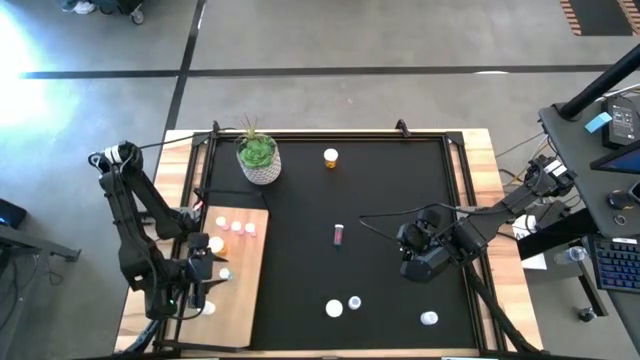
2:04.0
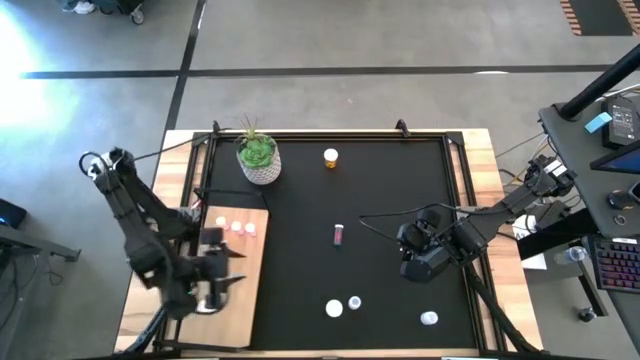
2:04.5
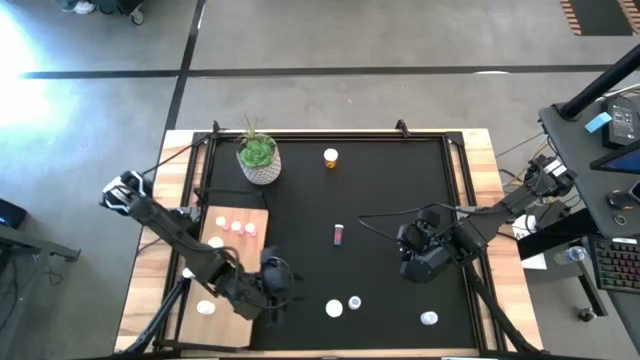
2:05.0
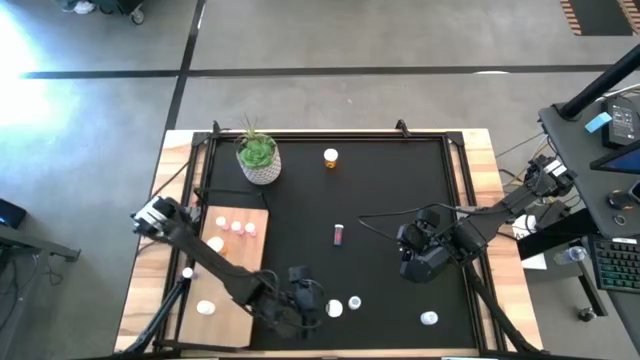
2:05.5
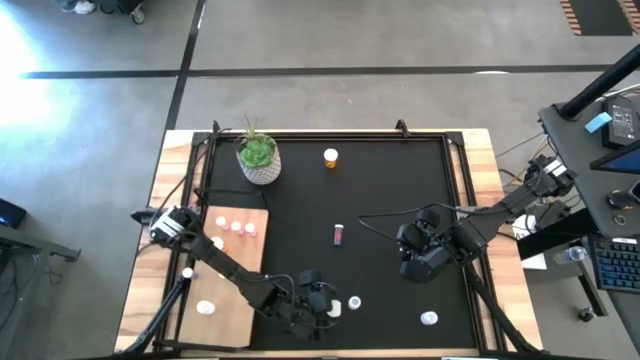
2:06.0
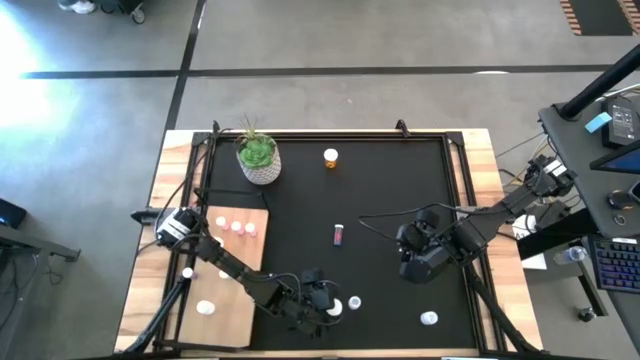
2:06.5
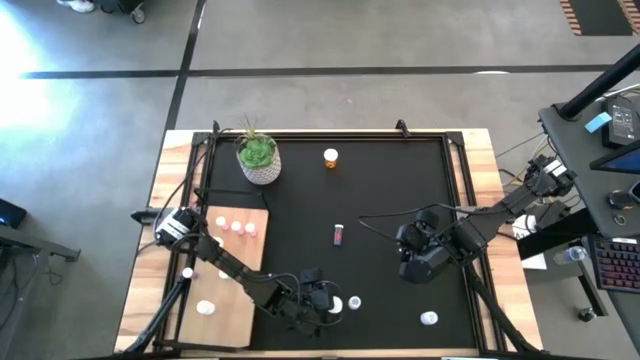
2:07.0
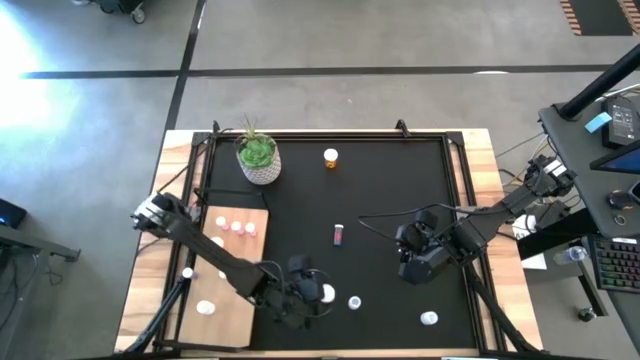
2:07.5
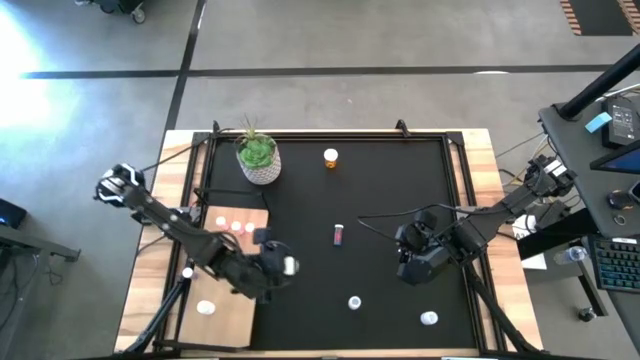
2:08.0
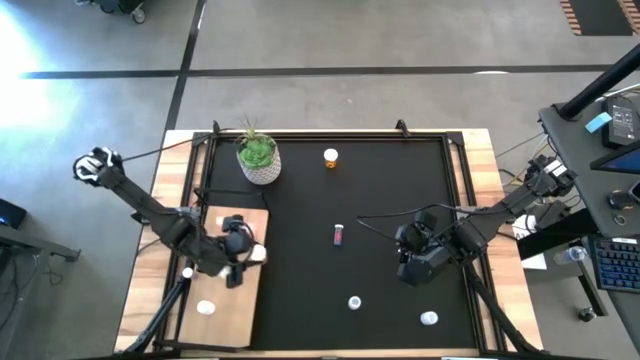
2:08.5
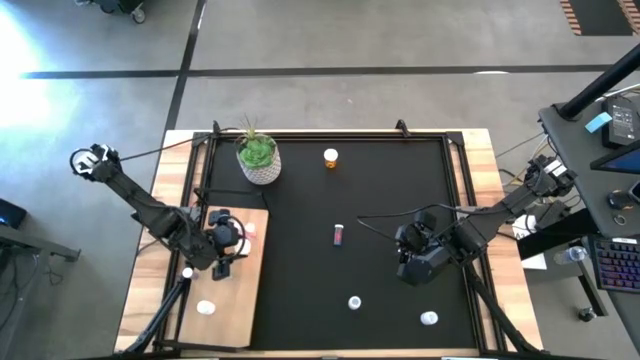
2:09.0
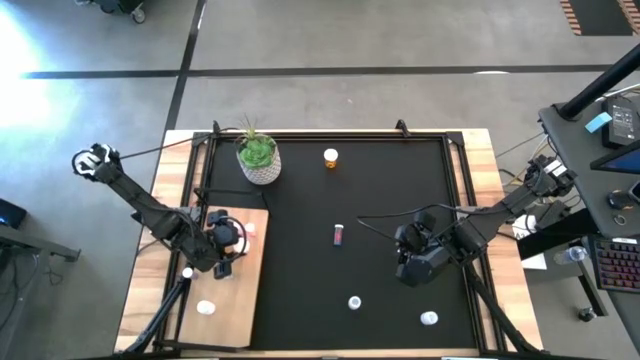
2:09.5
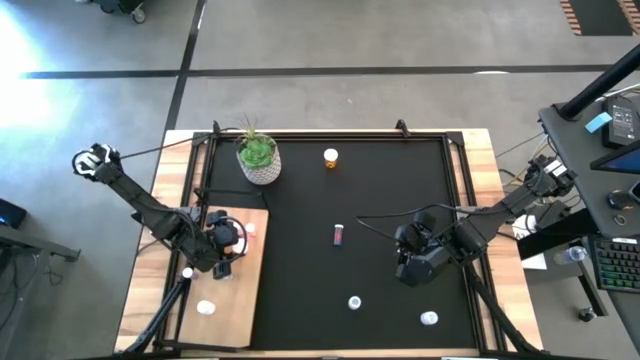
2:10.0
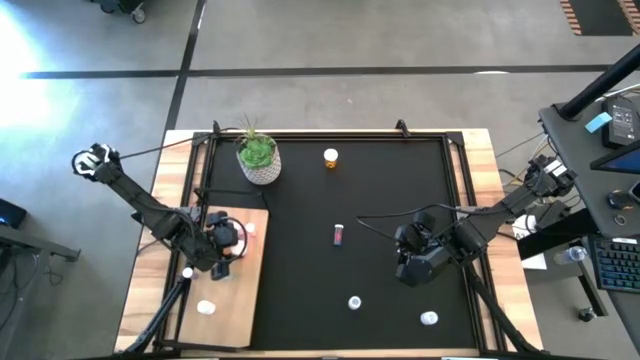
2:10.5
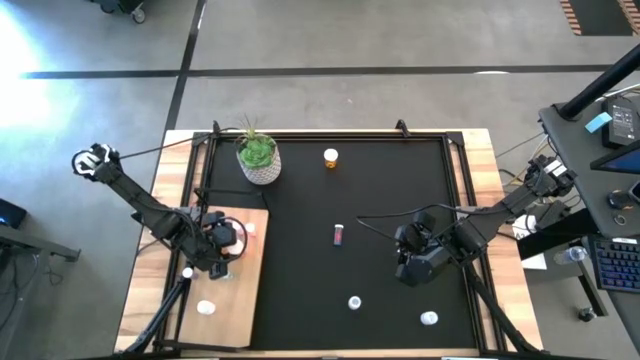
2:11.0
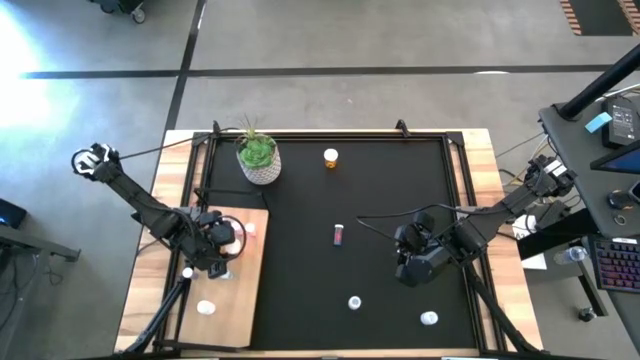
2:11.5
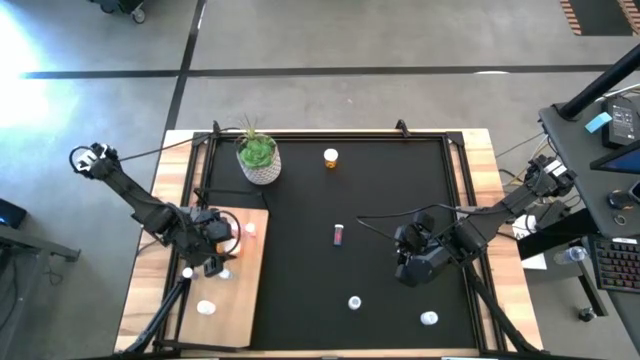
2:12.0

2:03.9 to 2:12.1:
Task: Pick and place medicine bottles onto shelf by color
Put the bottom orange pill bottle on the shelf aligned with the other orange pill bottle

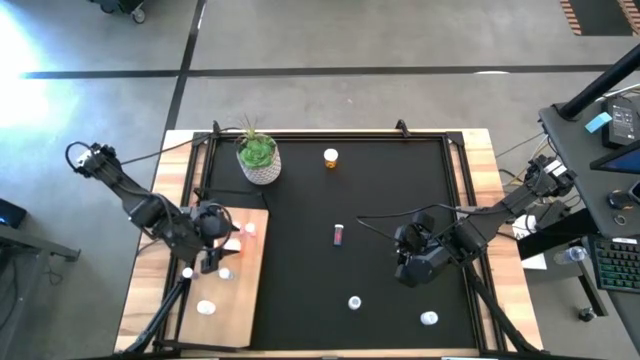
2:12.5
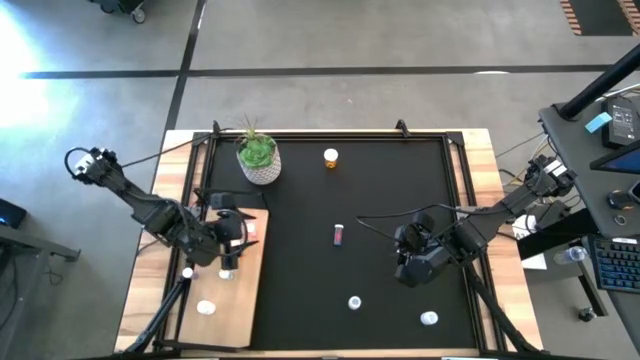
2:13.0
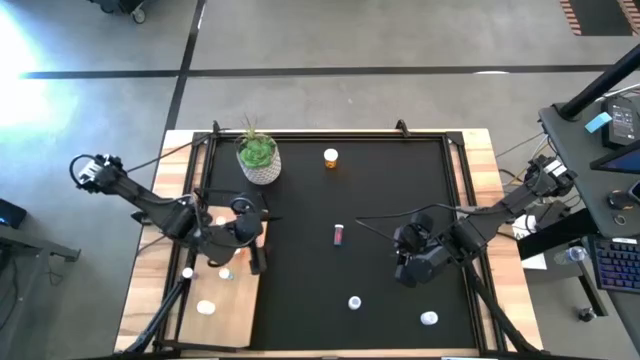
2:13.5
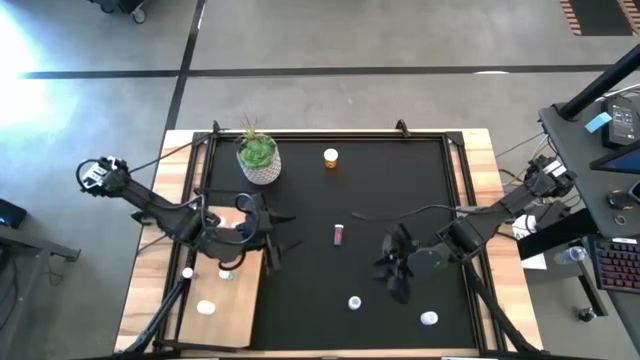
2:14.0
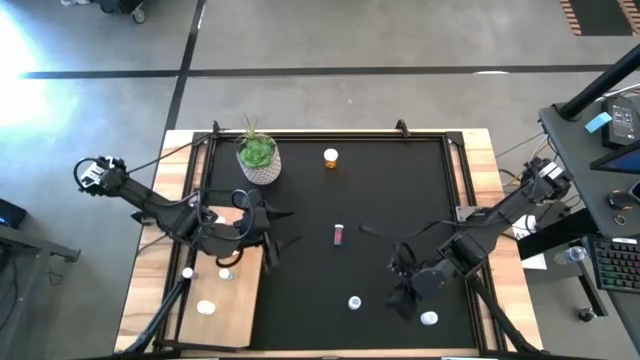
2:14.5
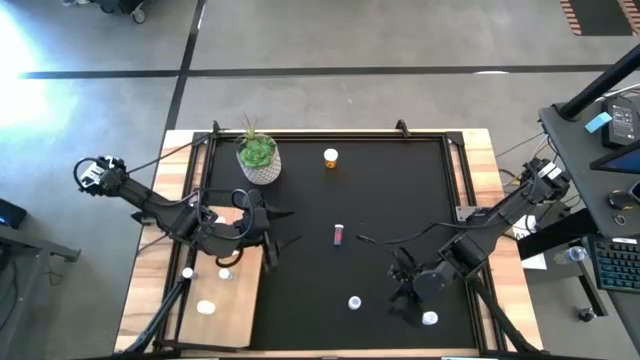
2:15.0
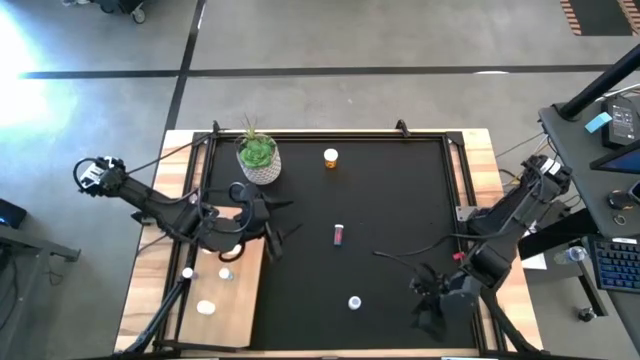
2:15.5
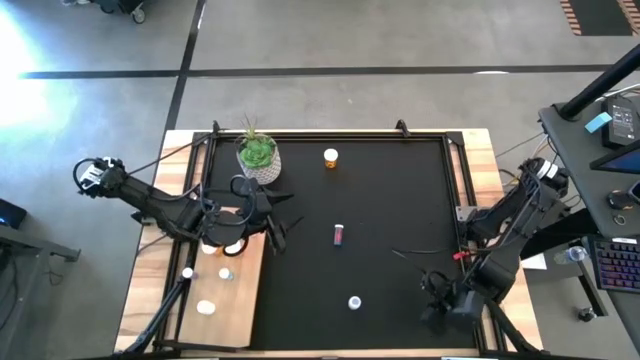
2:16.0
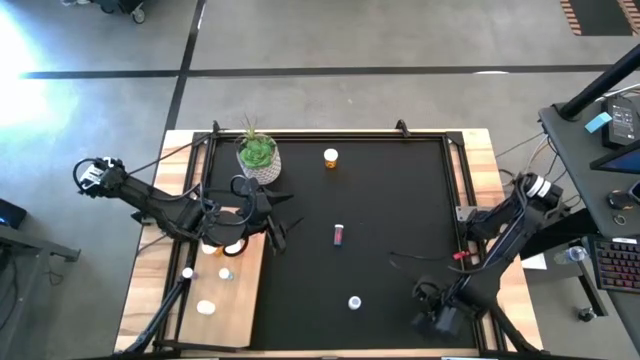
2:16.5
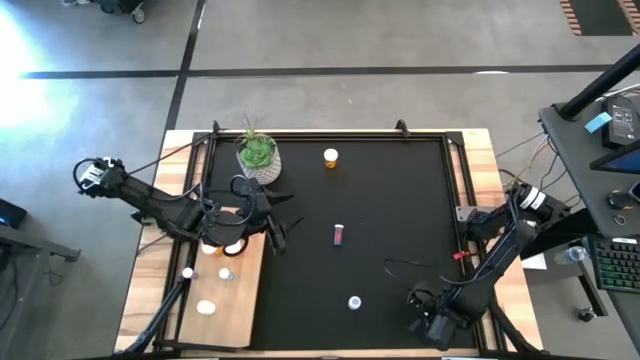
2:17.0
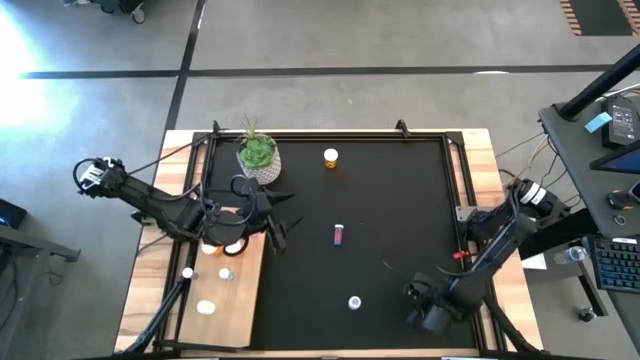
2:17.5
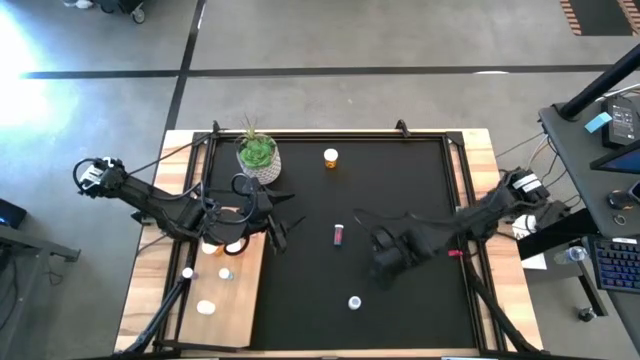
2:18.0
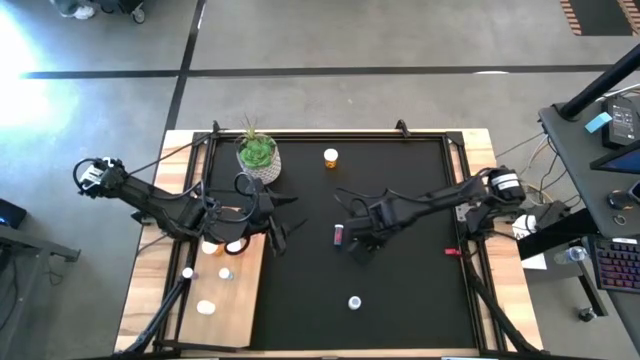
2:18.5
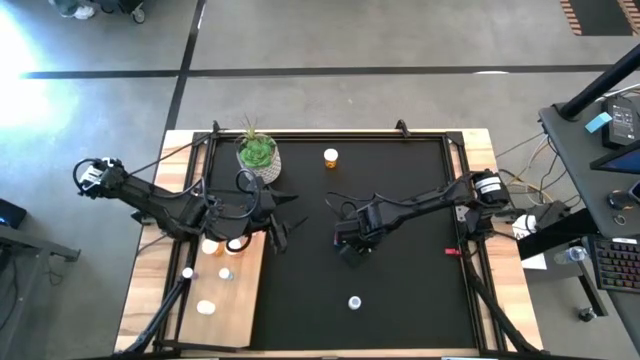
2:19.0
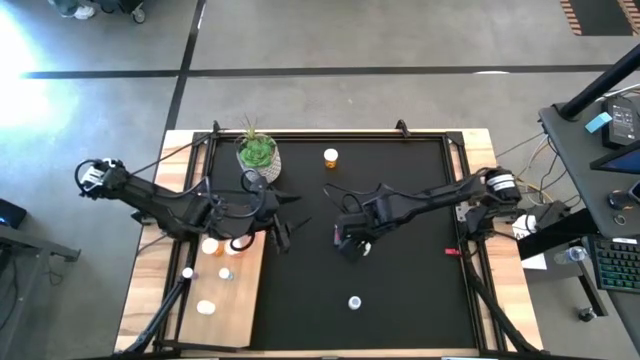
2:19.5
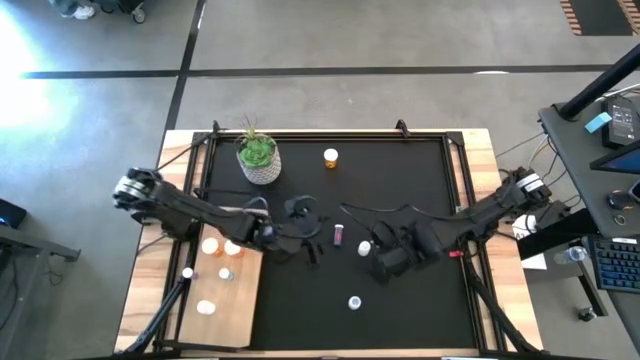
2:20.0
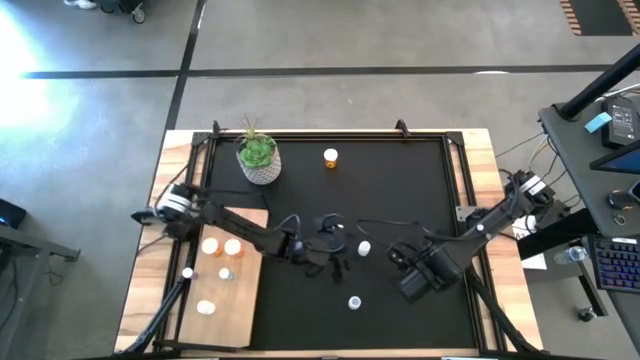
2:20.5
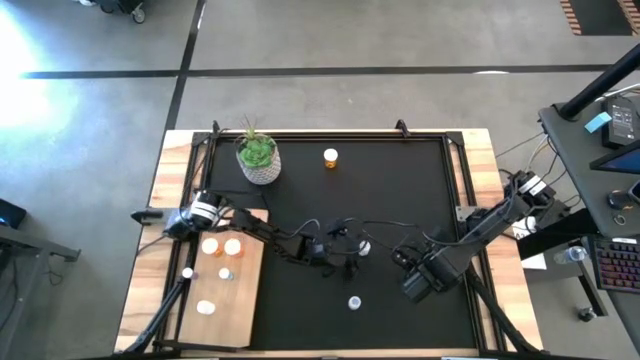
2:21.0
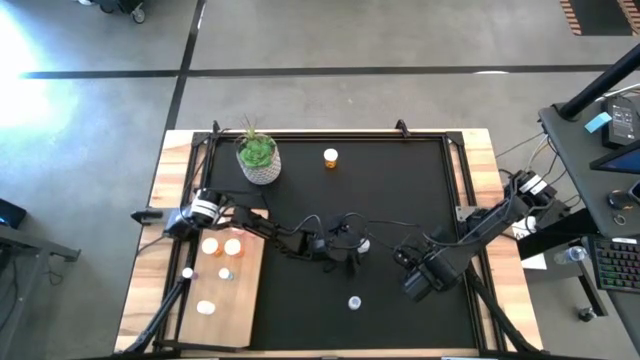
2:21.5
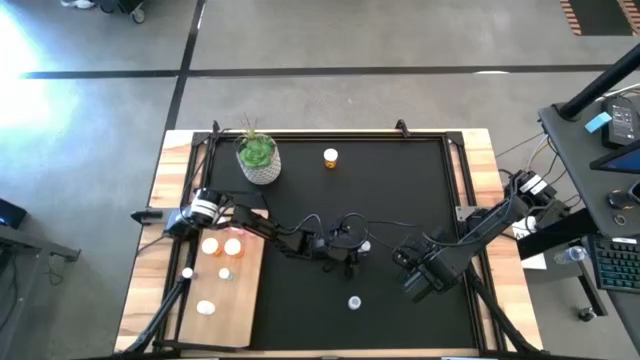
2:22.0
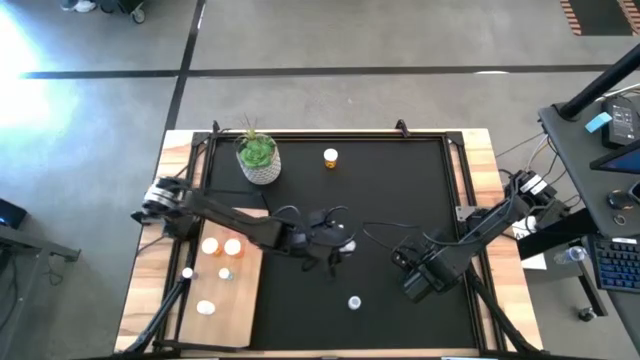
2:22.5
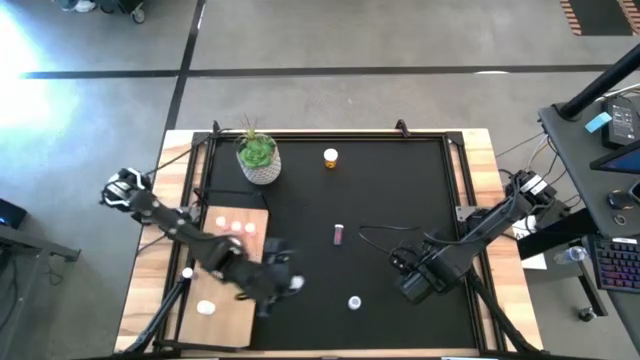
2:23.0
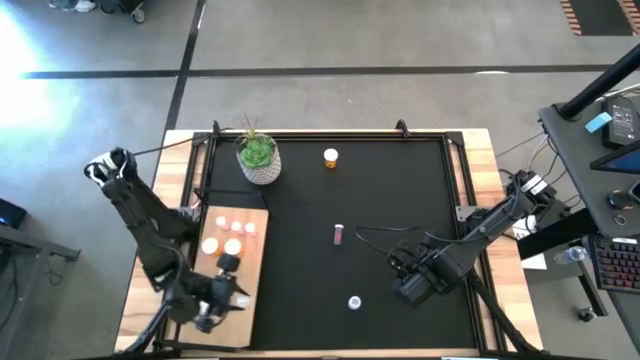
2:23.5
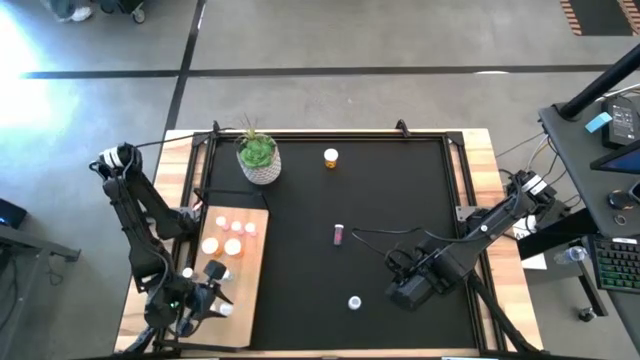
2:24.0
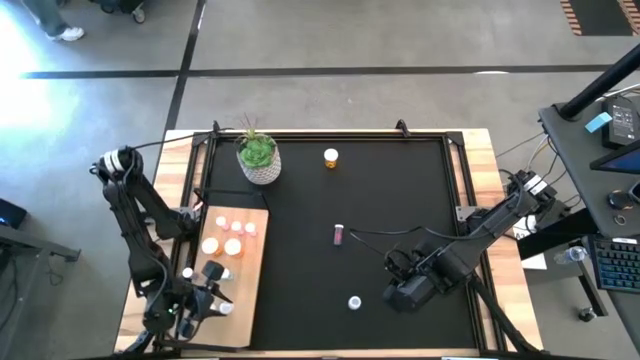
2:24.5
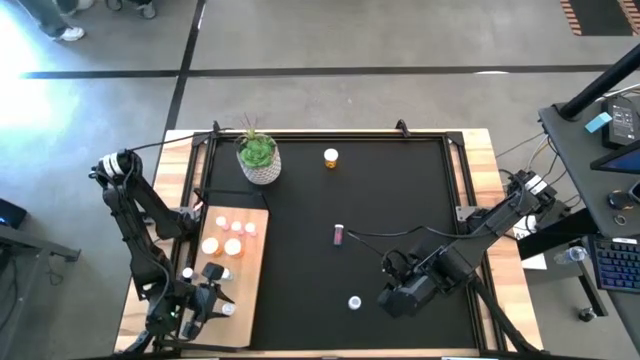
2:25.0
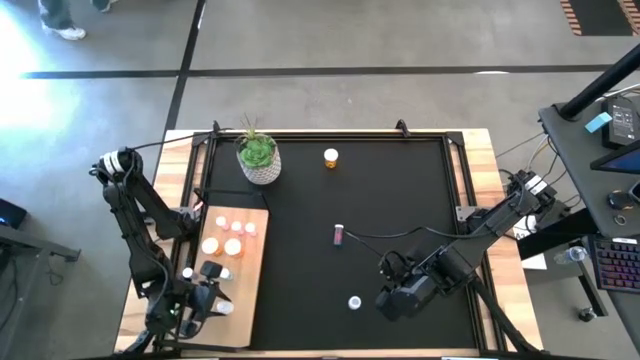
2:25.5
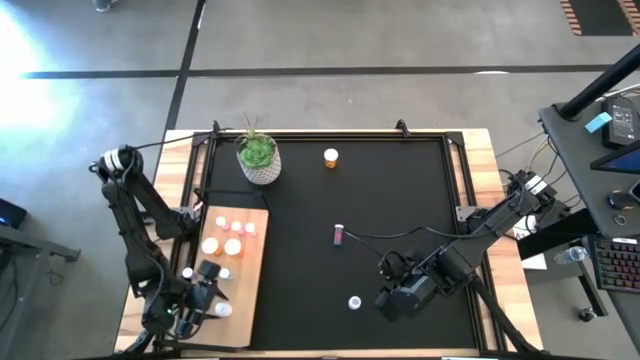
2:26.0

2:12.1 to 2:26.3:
Put the right white pill bottle on the shelf aligned with the other white pill bottle
